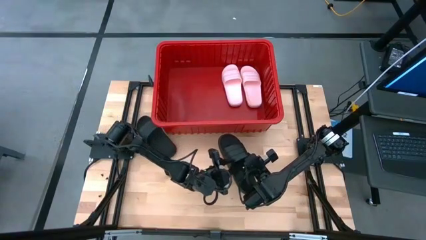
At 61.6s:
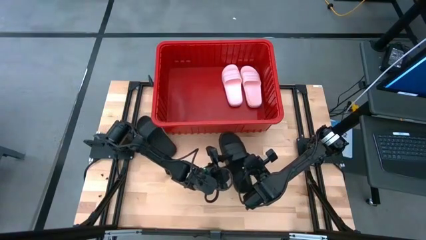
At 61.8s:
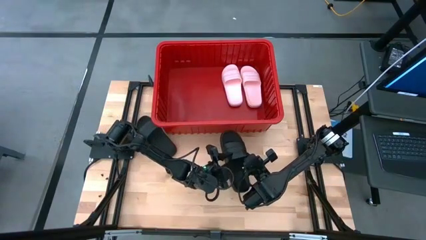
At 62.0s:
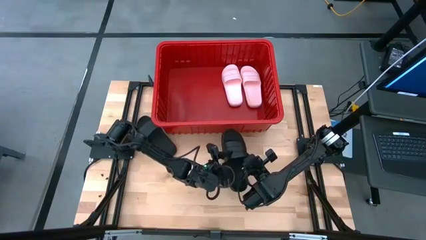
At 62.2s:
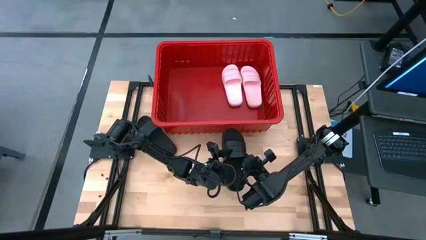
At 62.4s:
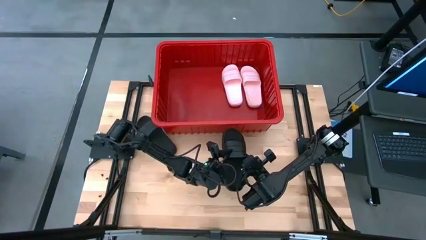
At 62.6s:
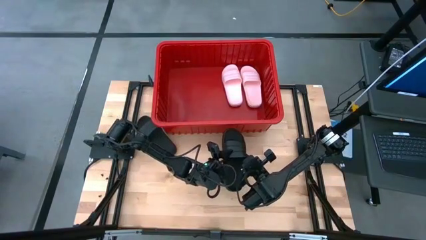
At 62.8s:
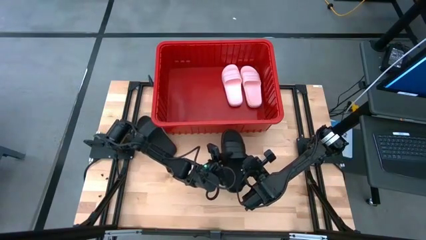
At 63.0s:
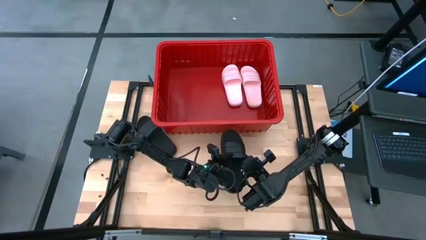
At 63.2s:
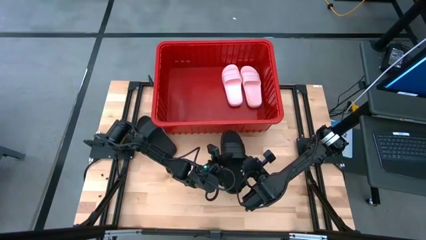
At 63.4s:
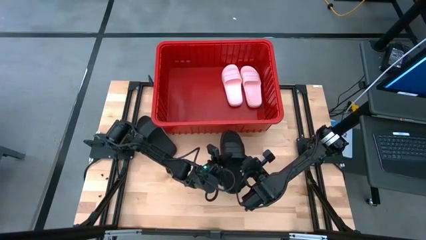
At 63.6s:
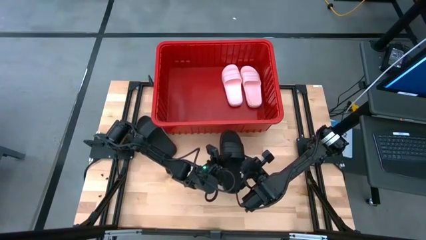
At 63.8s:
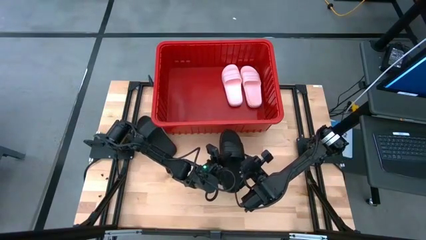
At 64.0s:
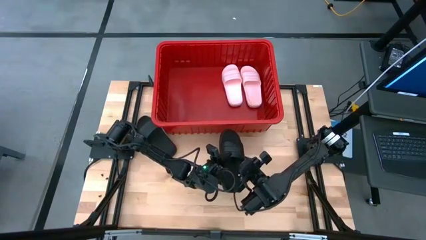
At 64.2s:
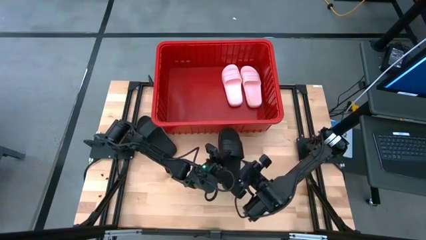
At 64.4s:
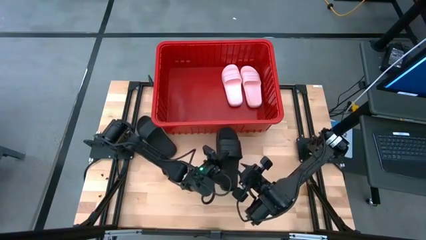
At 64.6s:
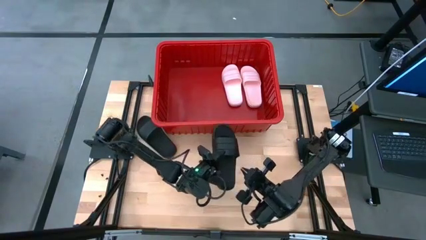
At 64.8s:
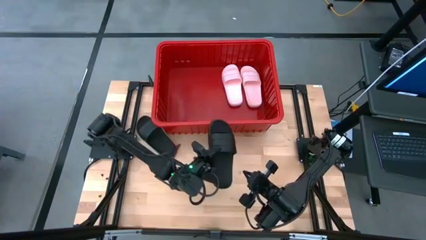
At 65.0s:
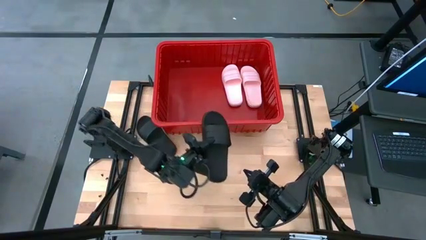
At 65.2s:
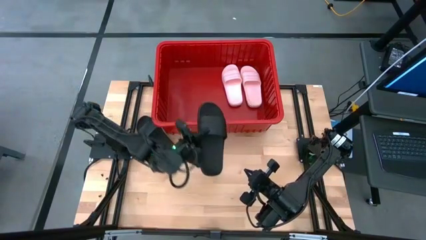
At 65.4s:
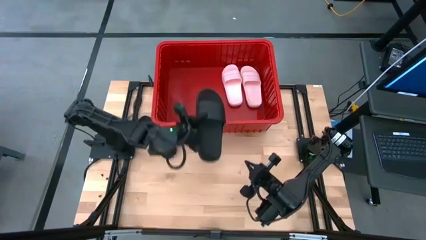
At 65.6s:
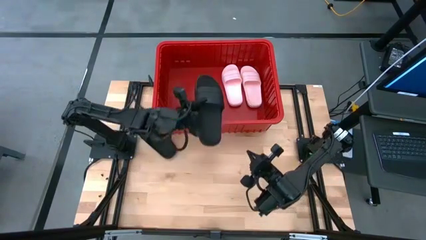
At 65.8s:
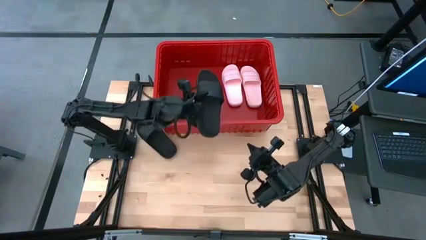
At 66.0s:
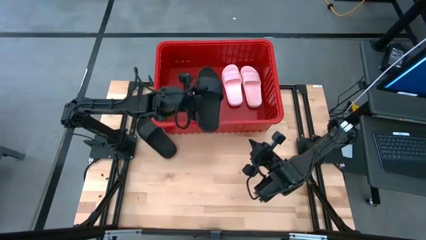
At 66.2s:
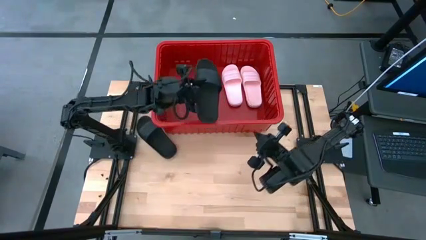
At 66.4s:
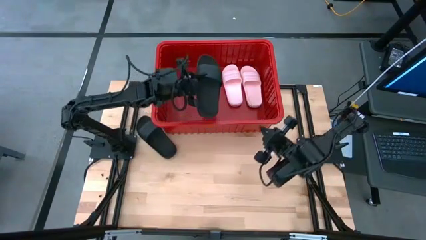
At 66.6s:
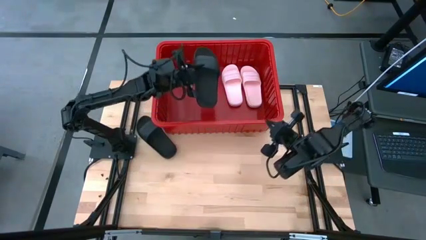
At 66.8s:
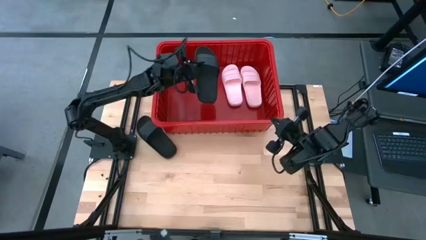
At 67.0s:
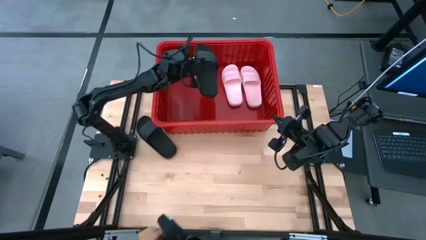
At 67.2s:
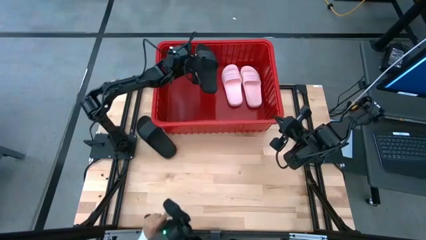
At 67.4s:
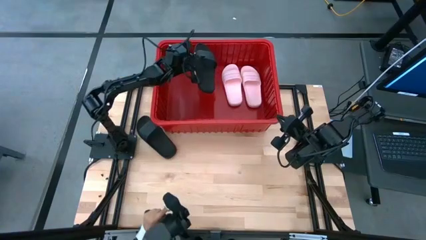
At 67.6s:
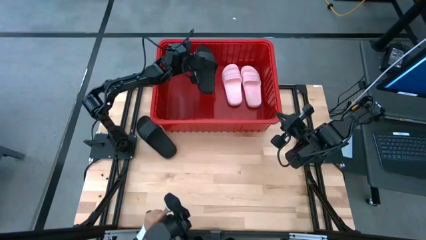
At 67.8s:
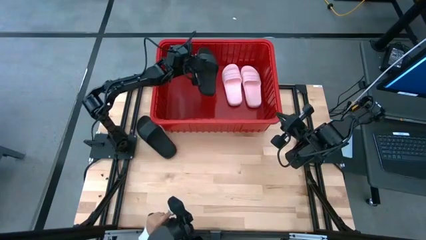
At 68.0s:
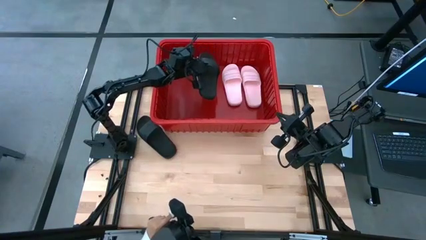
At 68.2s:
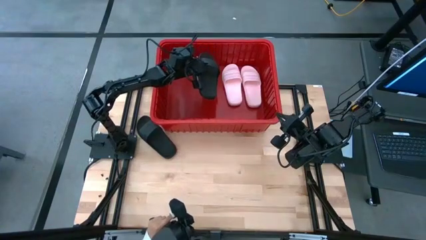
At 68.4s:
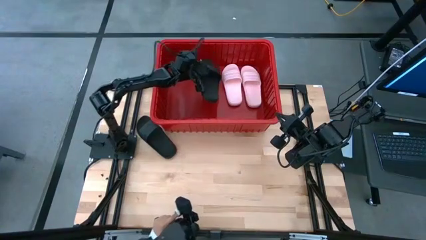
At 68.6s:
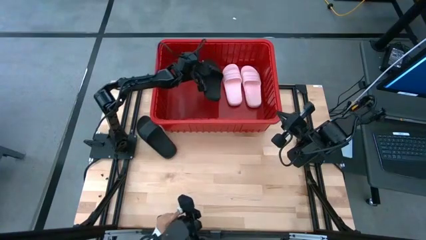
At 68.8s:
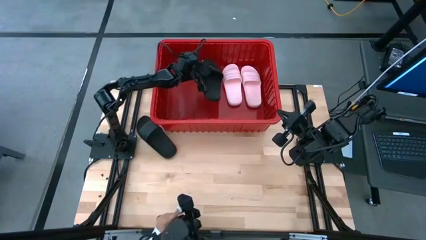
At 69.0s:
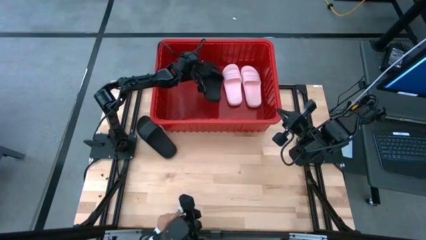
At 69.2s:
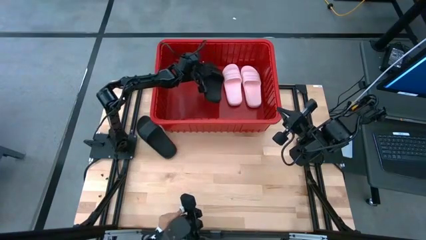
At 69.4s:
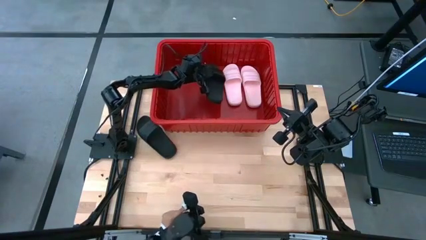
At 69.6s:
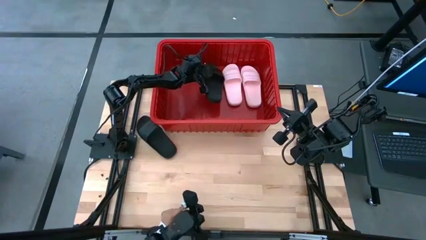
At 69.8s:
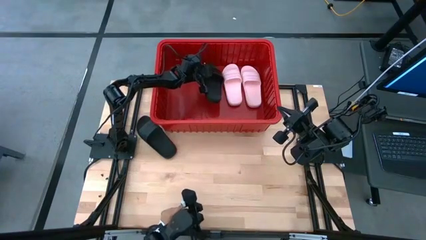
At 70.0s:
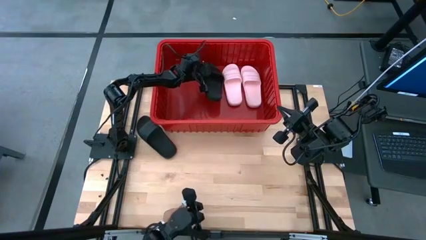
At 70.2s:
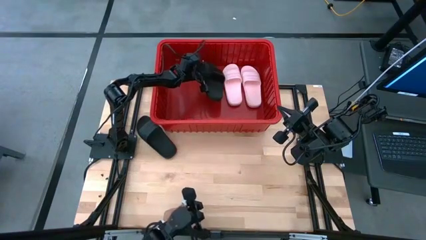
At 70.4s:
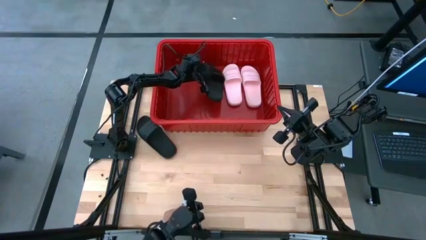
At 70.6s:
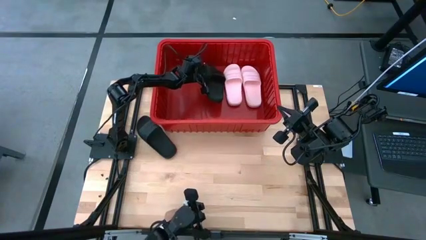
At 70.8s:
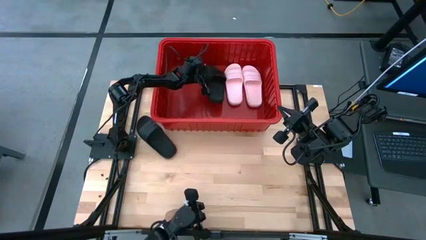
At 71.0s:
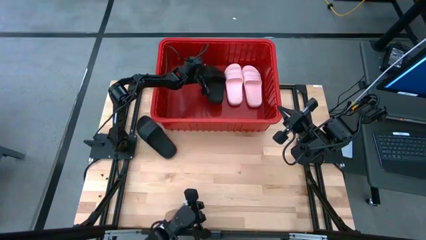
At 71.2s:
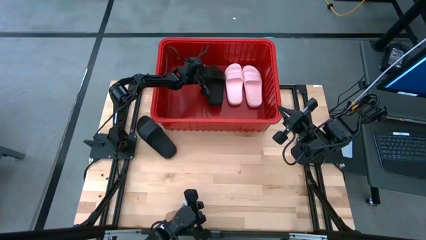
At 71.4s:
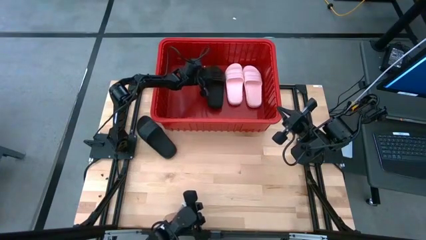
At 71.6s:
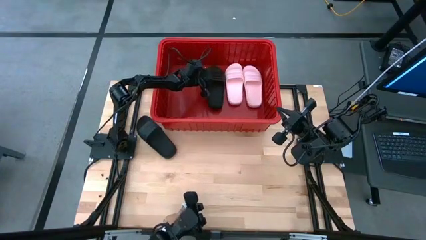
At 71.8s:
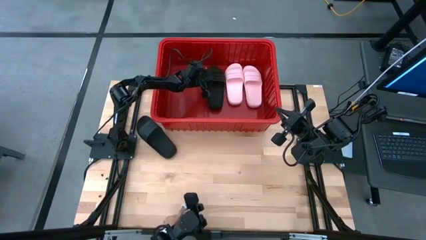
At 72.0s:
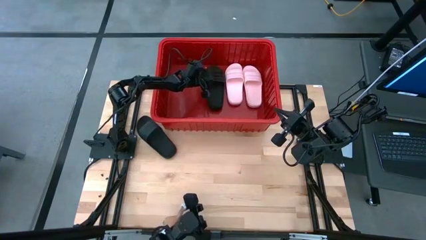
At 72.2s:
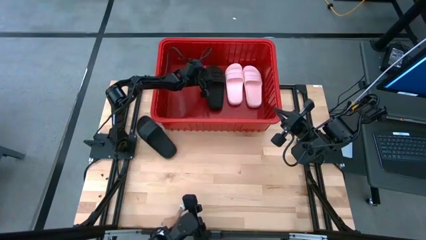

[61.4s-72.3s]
Task: Pick and place slides into bin
Put the bottom black slide into the red bin

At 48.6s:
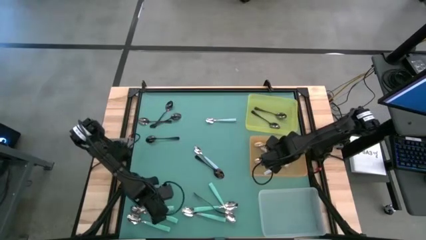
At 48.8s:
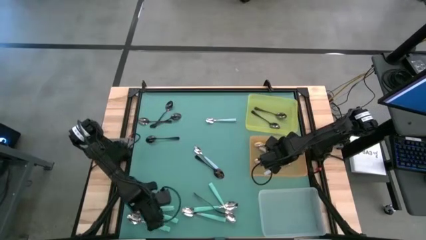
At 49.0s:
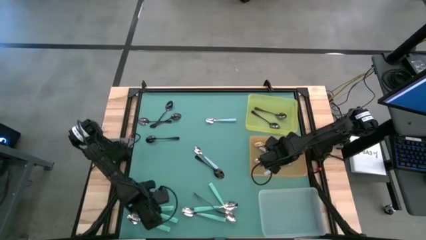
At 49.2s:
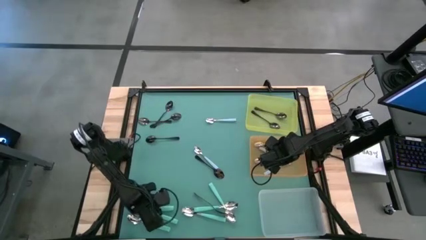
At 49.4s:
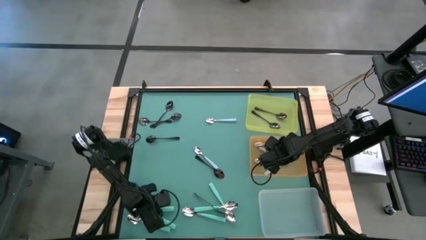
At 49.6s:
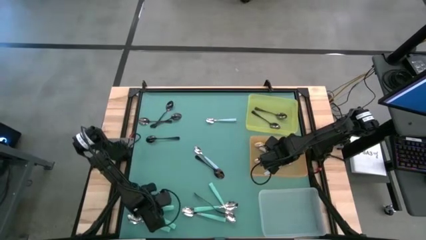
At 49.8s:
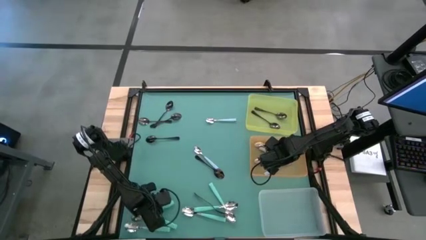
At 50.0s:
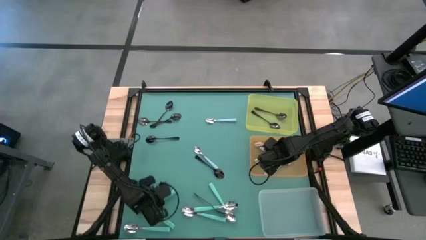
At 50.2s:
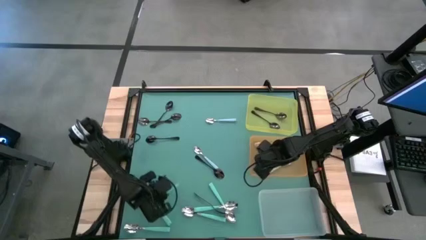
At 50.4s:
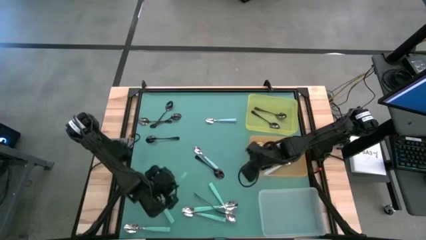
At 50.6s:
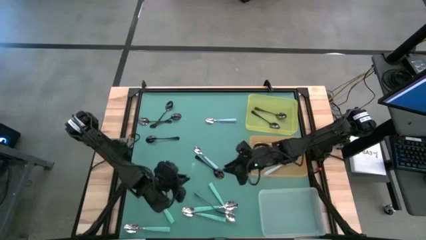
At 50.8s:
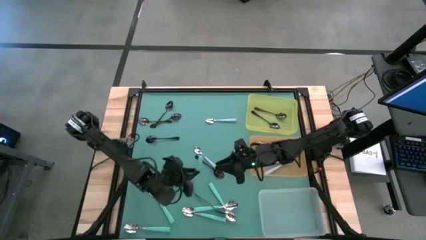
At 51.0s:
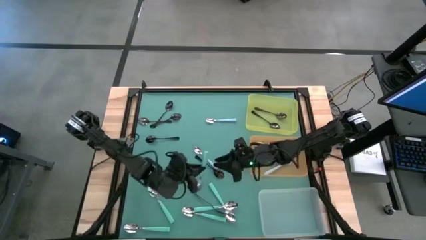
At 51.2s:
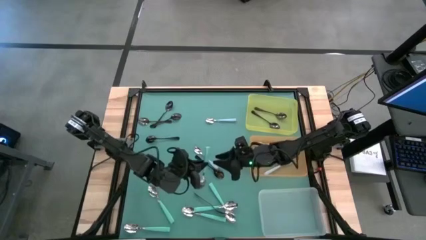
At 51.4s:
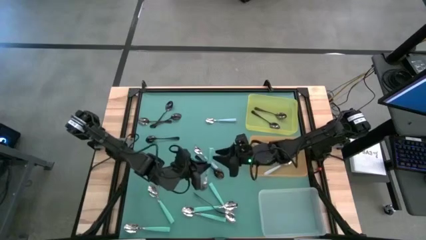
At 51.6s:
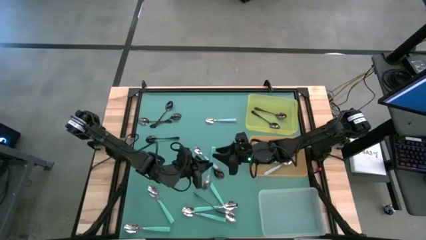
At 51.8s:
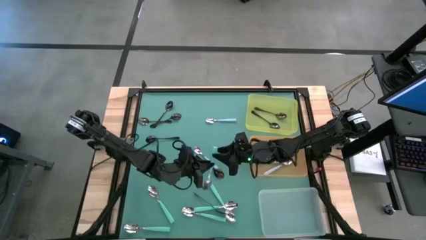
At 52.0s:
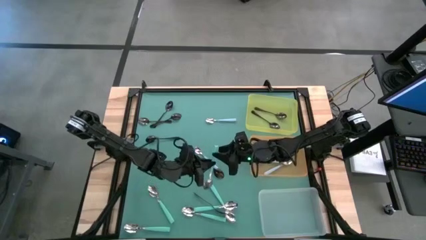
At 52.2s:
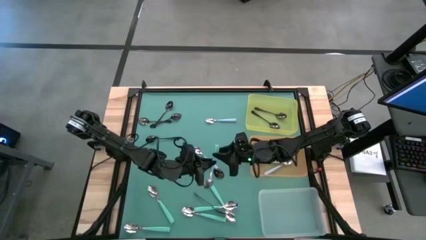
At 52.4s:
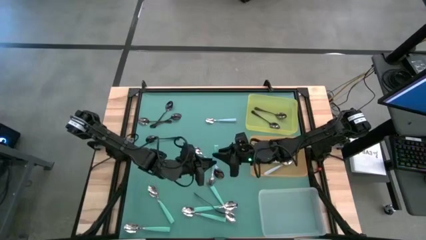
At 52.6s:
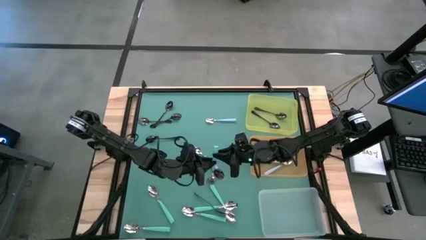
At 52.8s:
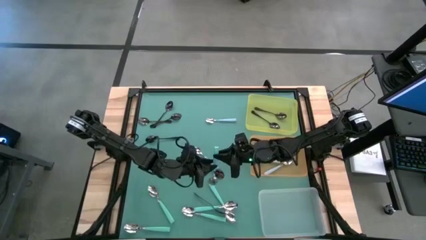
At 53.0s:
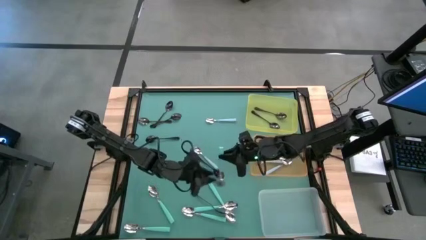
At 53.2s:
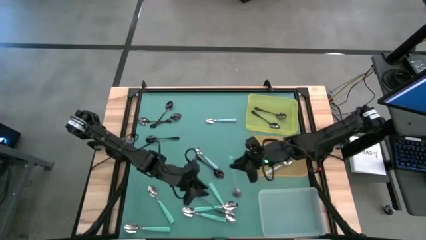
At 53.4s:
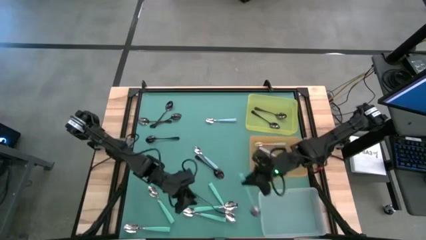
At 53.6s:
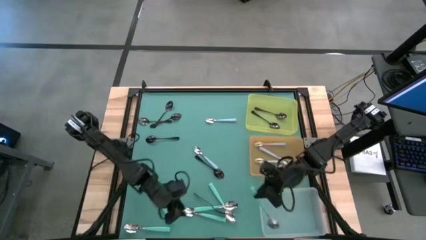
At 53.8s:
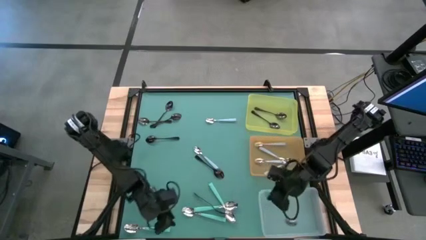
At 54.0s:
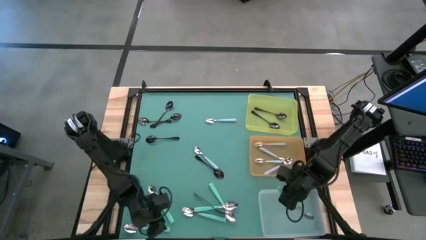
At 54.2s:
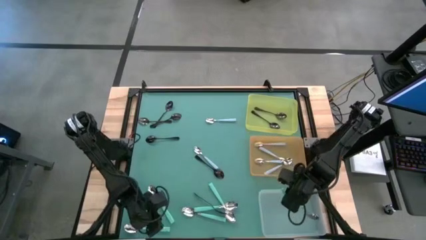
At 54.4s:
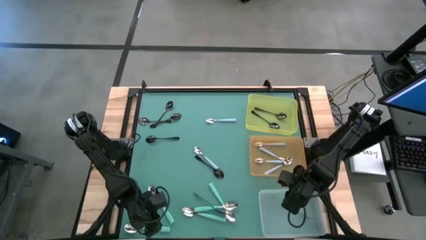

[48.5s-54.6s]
Task: Sort silverware by color (type)
Put the green spoon into the transparent bin
